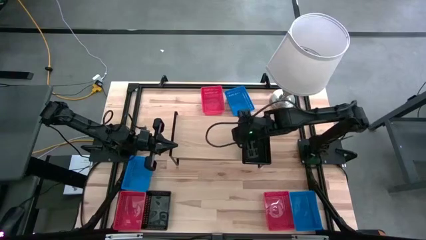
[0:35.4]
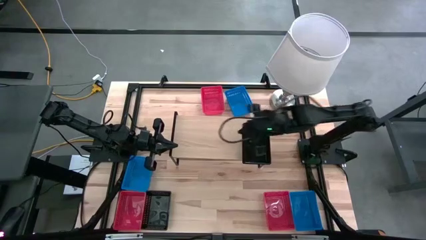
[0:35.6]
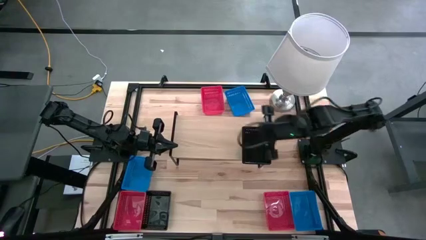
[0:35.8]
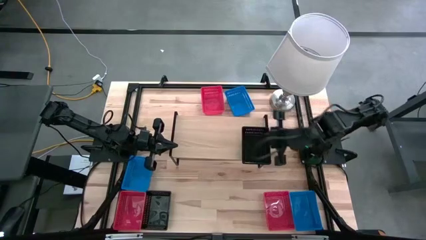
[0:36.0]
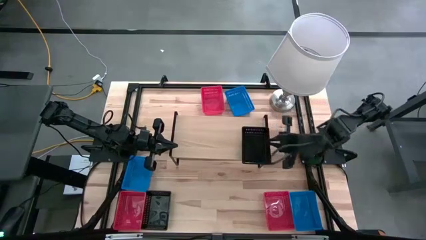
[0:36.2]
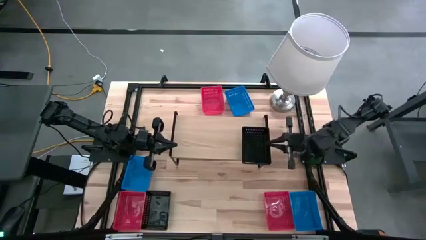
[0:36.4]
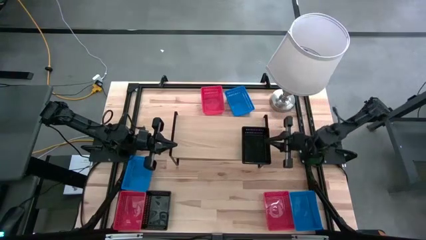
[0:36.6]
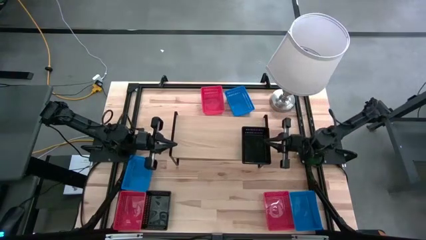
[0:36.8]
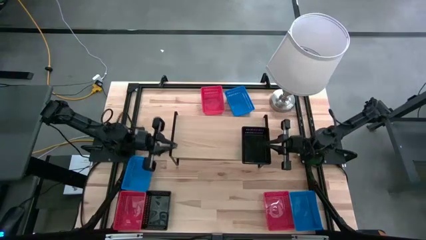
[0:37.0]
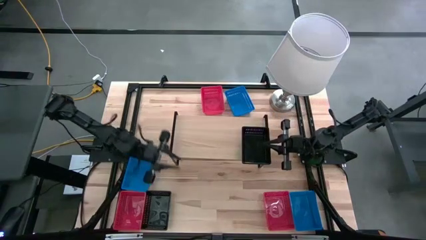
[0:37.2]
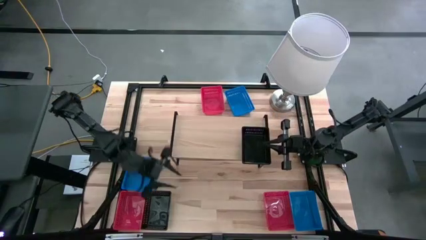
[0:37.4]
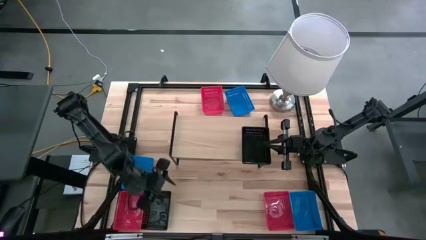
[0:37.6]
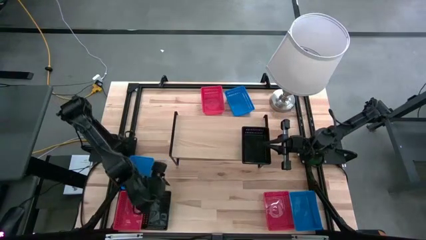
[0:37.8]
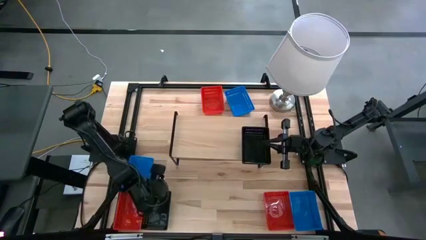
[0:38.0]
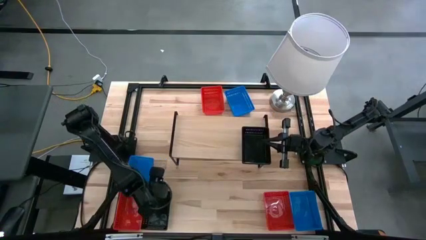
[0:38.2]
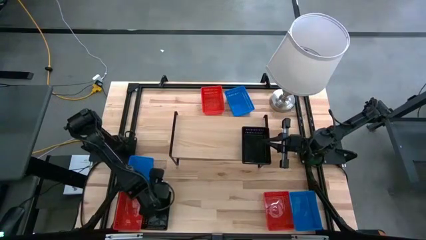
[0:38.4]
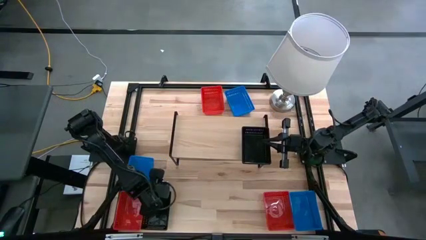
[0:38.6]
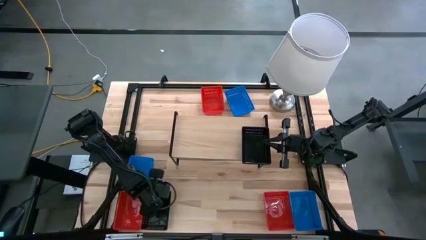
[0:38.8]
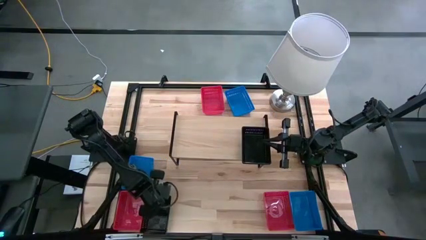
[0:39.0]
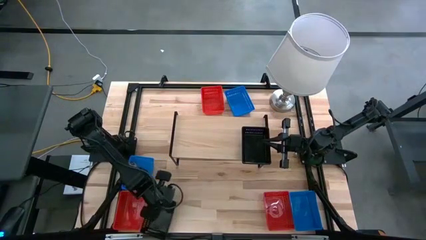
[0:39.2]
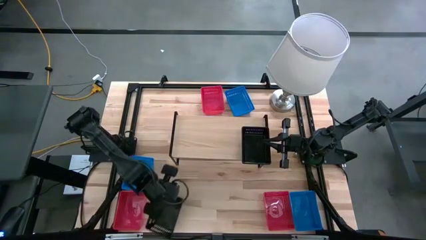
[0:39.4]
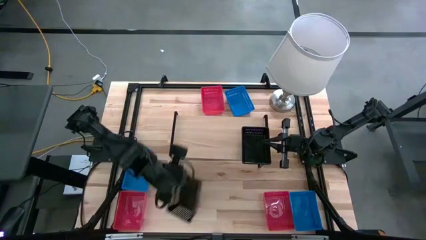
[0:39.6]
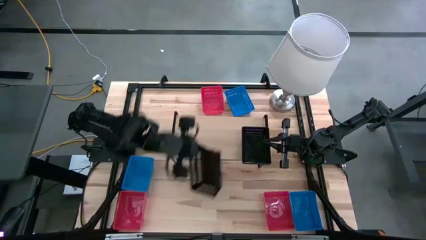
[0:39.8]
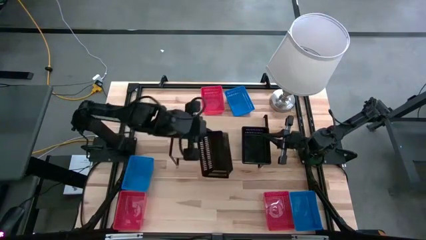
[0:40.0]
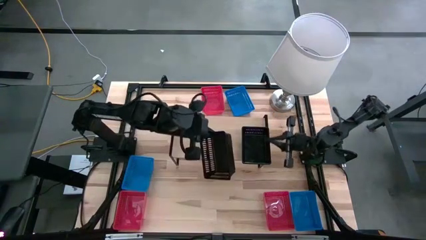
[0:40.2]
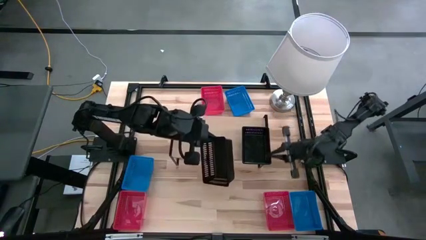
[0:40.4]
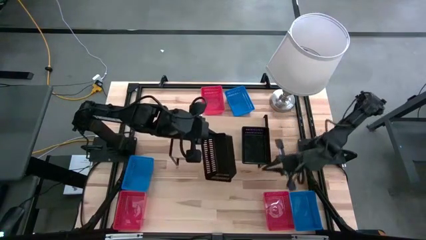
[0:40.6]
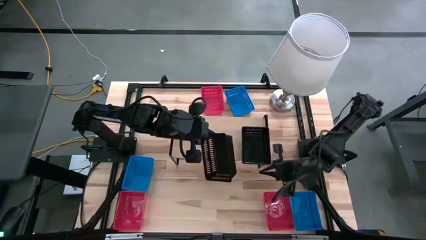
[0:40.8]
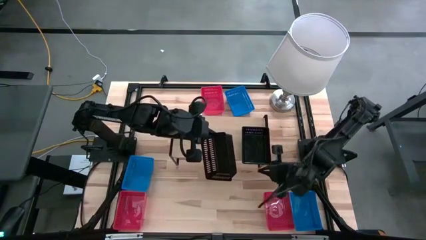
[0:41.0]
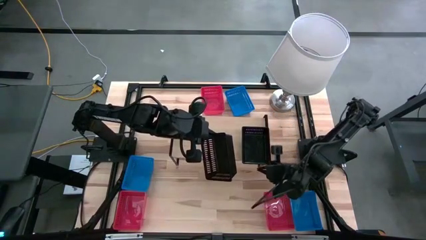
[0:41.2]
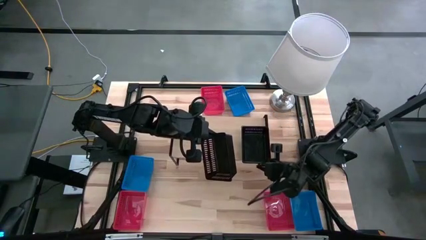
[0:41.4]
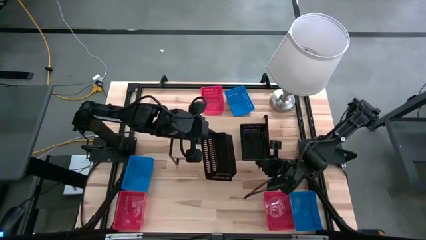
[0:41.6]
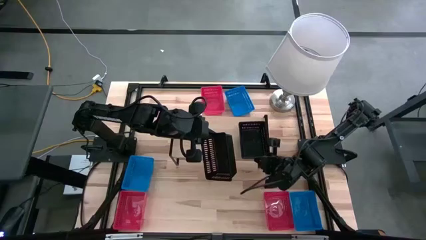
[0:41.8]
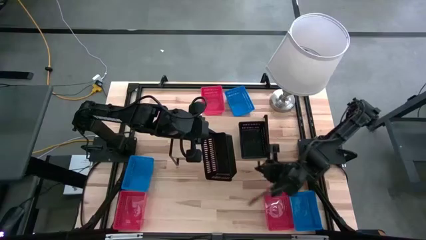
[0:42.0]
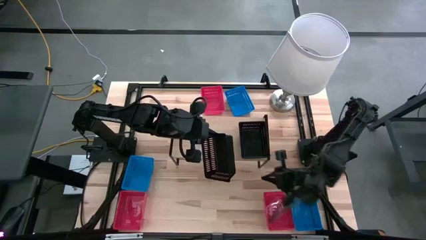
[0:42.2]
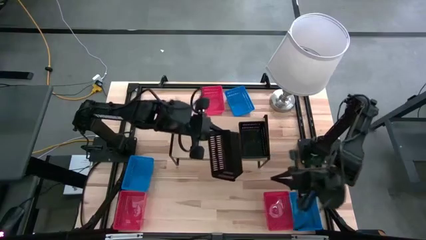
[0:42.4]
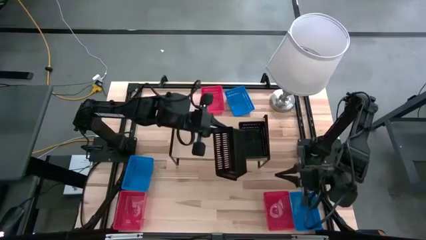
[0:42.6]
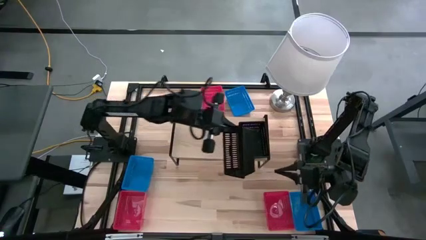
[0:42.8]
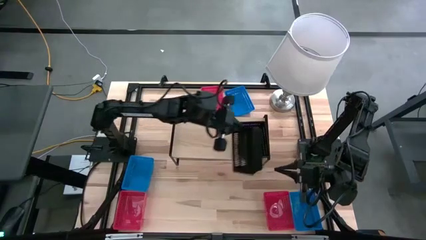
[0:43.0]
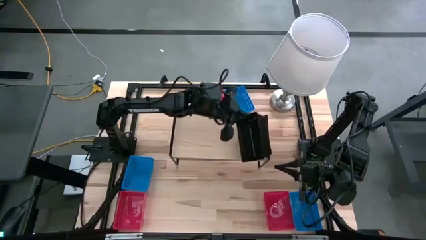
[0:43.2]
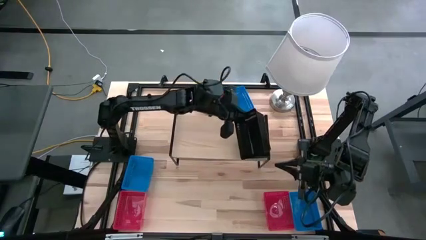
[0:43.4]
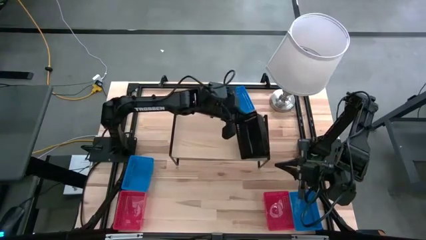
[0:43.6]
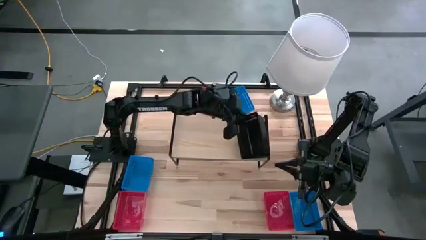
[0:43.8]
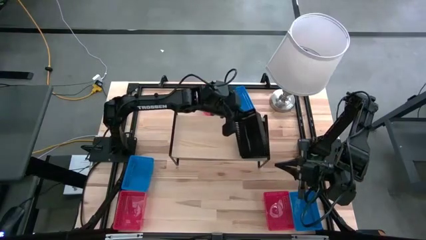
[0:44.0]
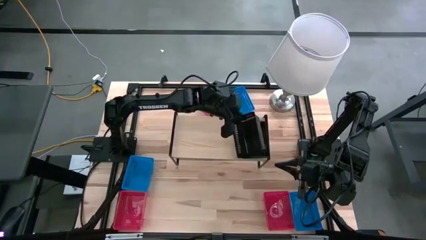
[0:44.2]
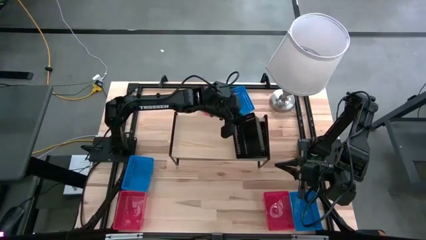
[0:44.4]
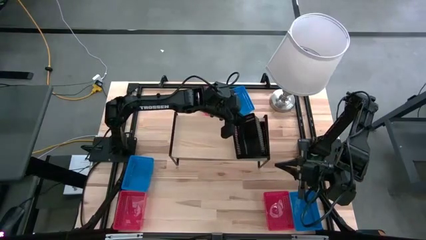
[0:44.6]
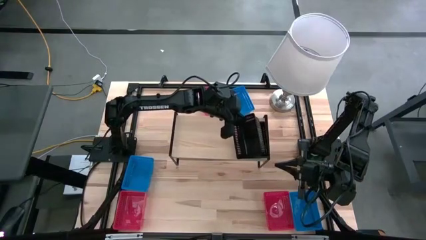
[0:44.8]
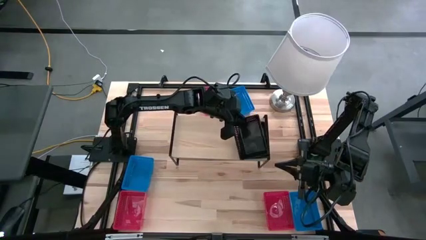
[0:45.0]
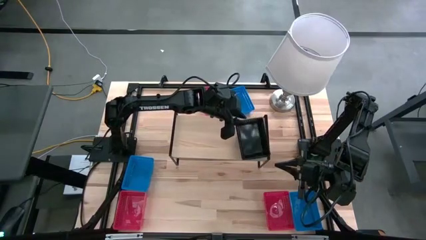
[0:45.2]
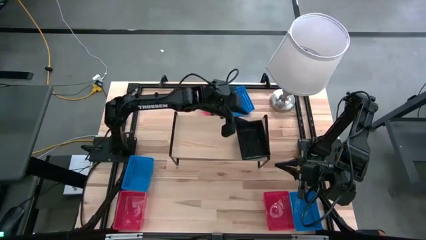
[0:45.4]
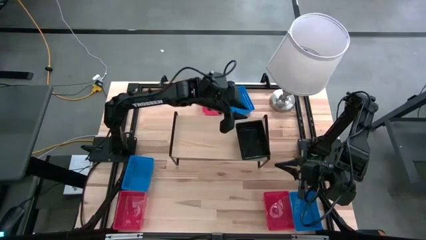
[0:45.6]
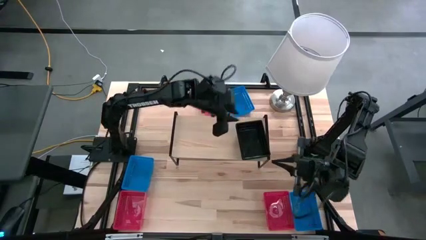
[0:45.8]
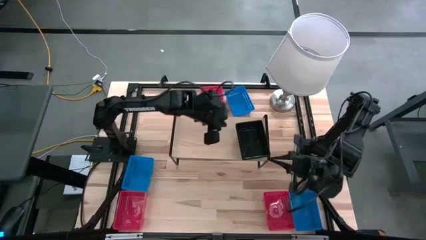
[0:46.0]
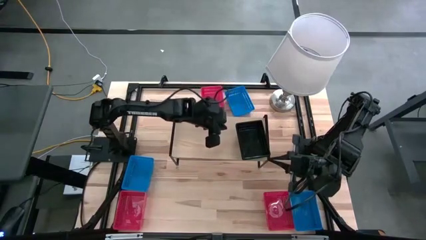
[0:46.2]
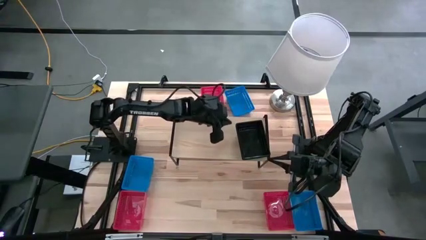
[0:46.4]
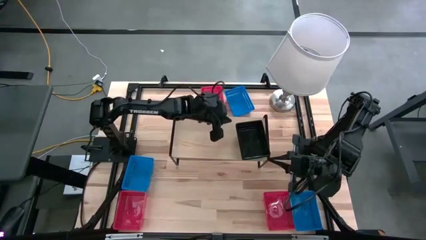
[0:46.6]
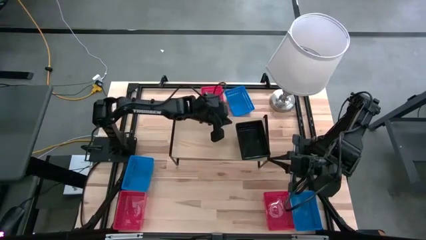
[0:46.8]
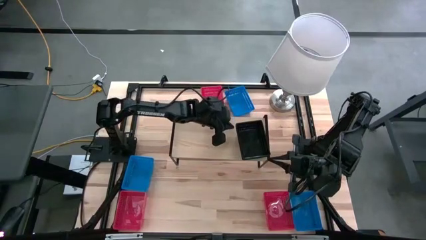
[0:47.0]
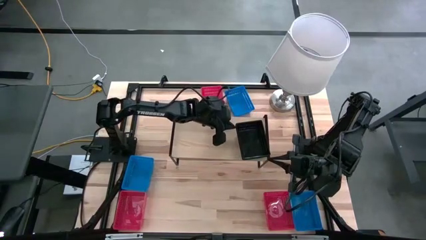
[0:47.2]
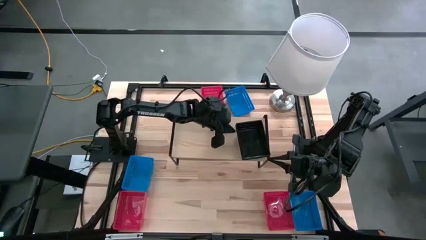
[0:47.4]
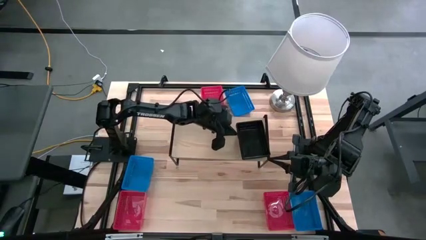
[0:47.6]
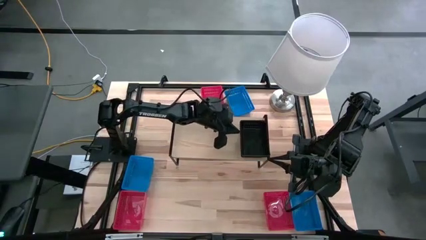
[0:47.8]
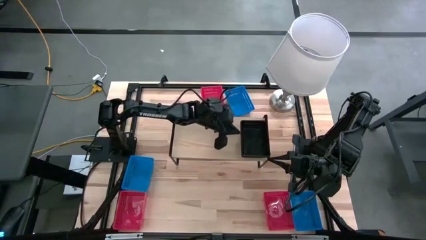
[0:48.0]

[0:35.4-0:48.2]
Task: Stack baskets on shelf by color
Stack the black bin on the black bins on the shelf

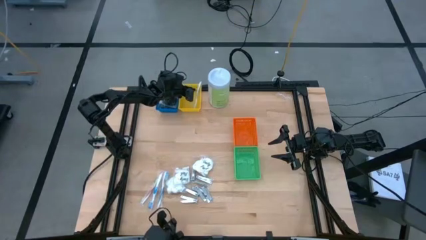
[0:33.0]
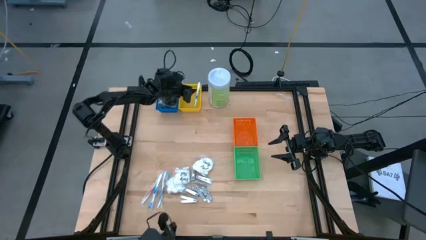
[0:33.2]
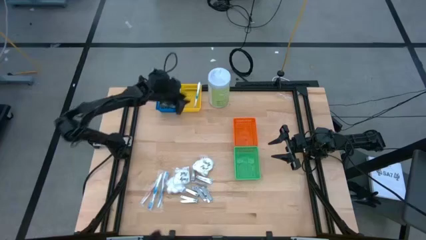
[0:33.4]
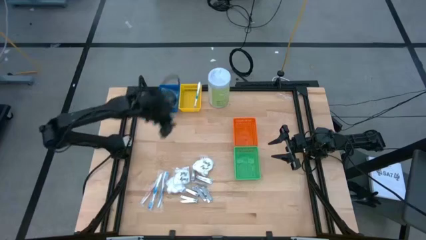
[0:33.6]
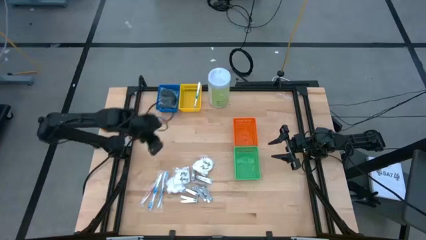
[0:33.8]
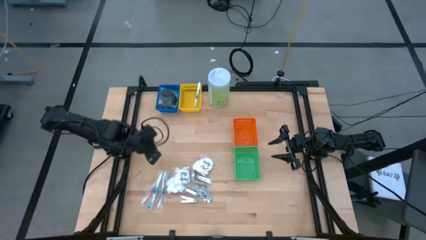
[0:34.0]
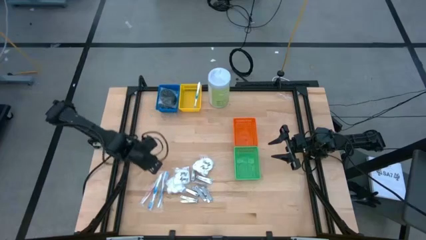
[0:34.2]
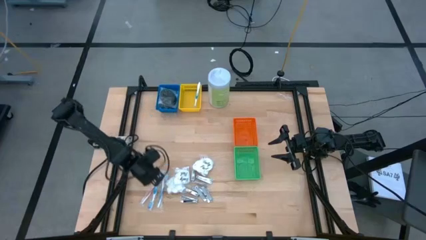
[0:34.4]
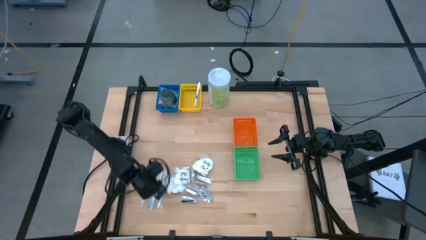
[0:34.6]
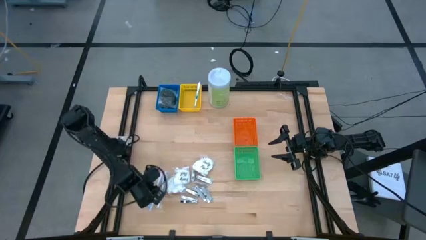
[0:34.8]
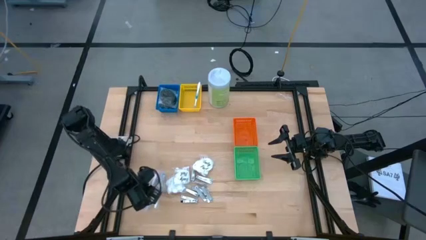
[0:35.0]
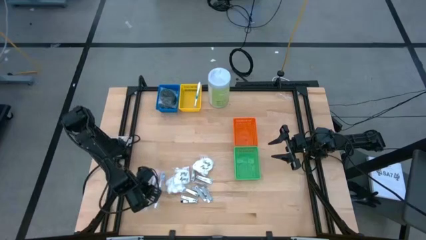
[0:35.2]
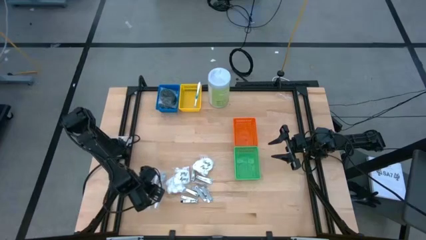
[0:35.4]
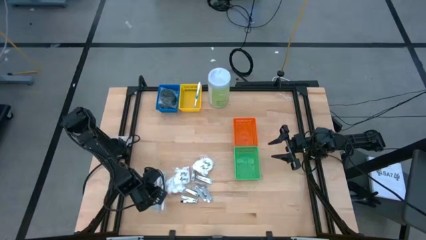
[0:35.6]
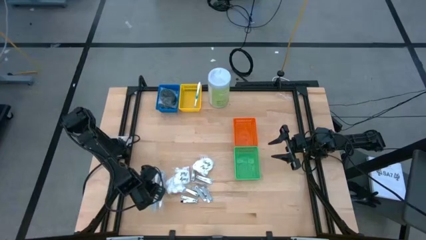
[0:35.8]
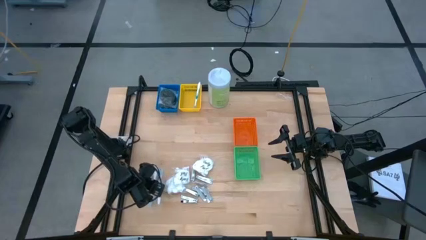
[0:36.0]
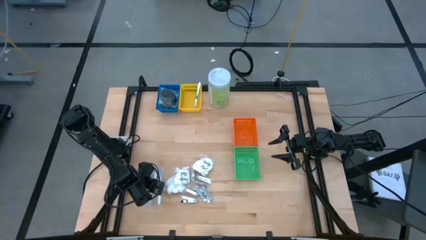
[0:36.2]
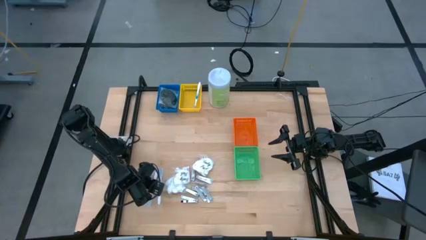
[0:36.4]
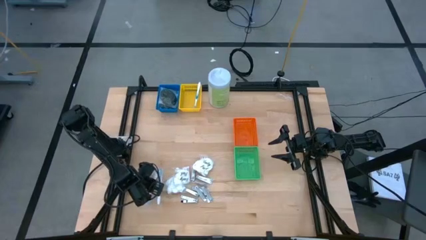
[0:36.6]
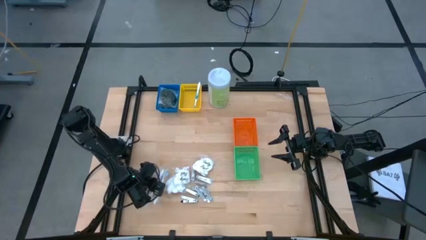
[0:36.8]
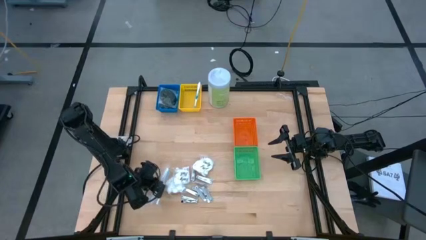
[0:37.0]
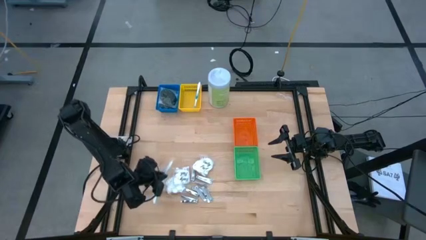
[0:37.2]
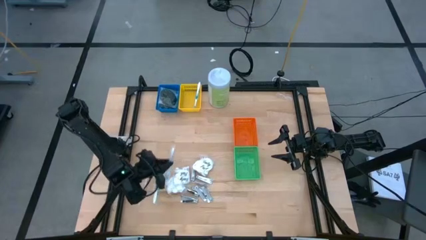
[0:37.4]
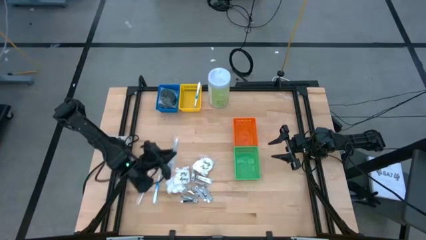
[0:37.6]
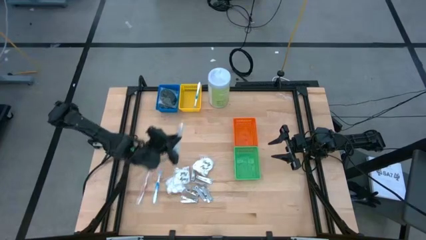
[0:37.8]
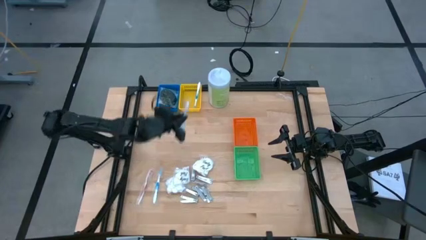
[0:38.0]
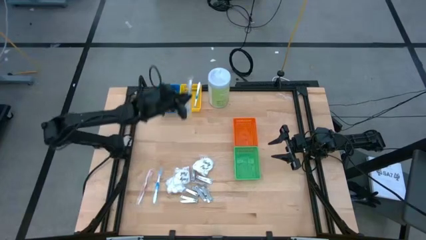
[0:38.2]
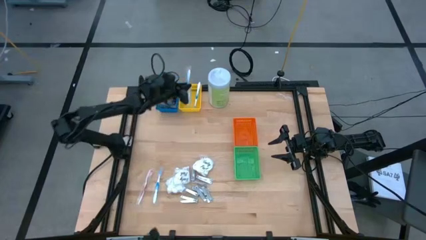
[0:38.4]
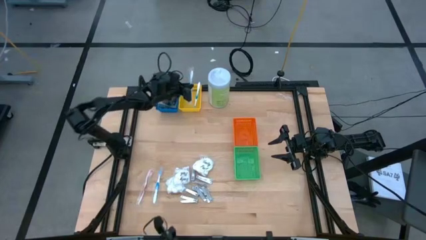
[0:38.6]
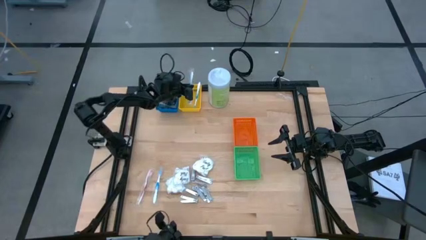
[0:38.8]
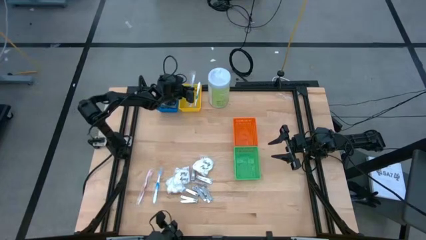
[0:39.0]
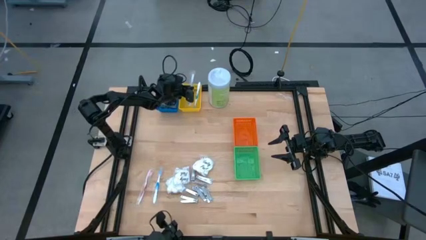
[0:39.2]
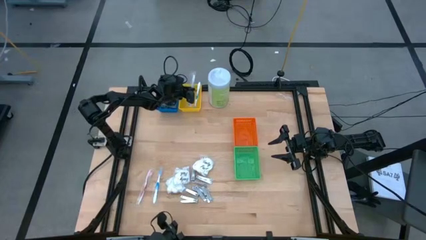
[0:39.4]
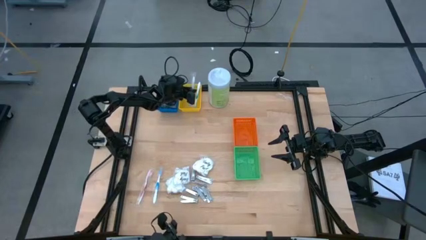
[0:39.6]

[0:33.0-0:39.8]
Task: Pick & Place Travel size toiletries
Put the blue toothbrush into the yellow bin
